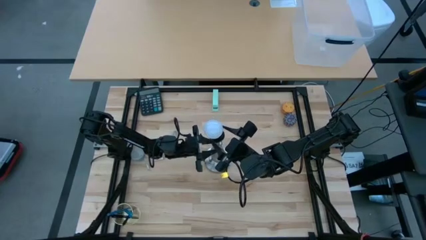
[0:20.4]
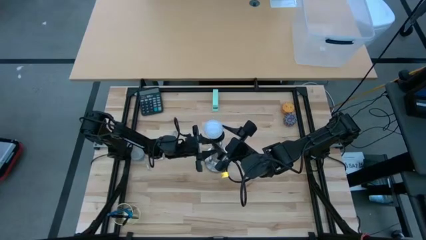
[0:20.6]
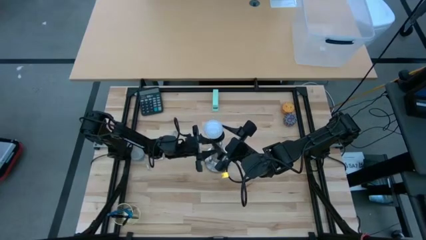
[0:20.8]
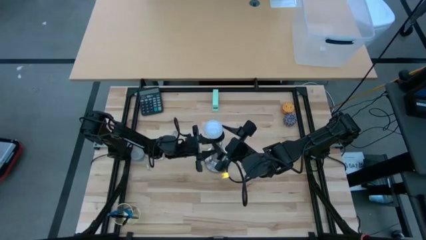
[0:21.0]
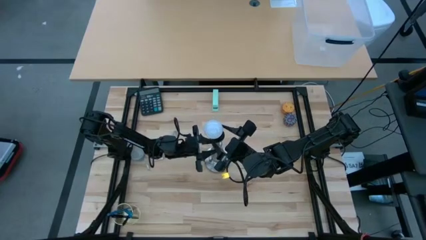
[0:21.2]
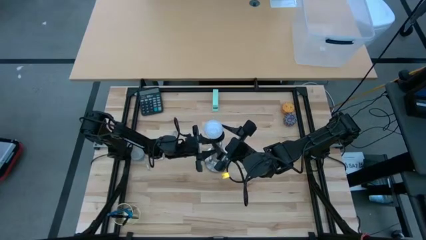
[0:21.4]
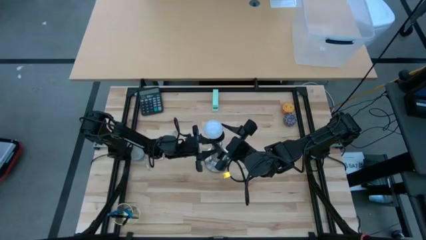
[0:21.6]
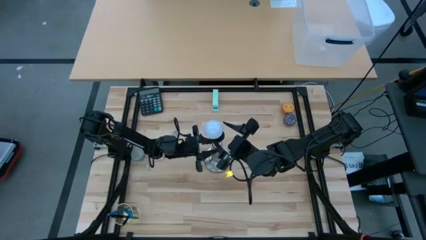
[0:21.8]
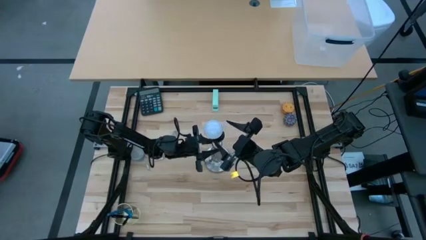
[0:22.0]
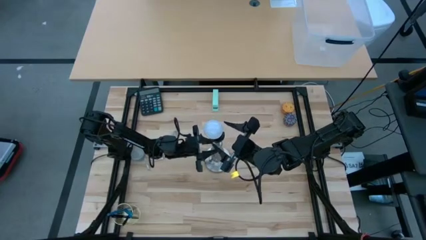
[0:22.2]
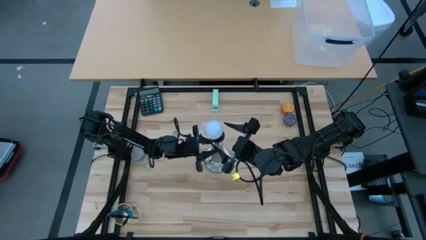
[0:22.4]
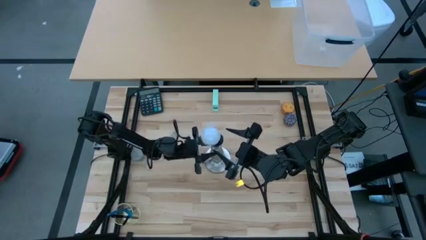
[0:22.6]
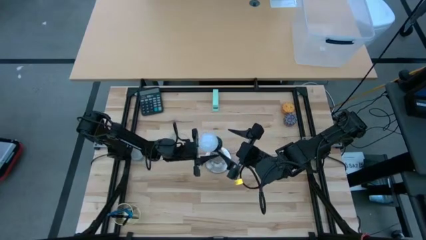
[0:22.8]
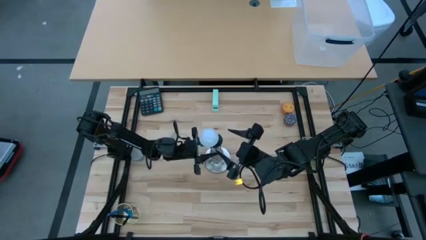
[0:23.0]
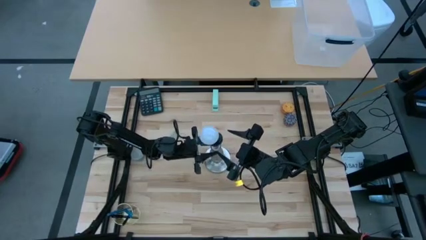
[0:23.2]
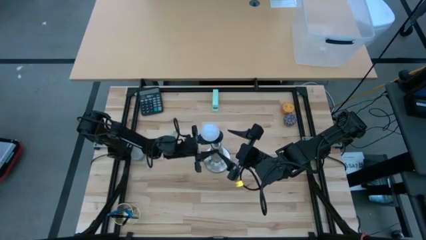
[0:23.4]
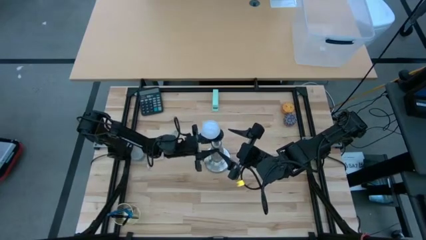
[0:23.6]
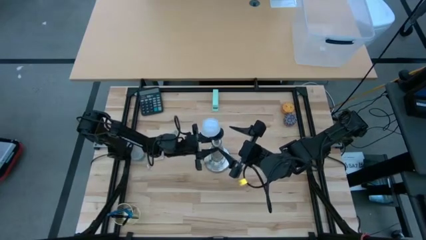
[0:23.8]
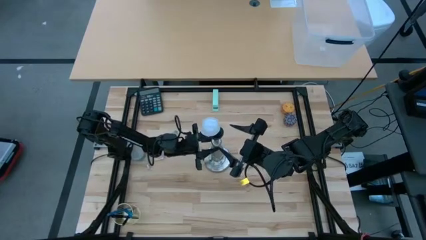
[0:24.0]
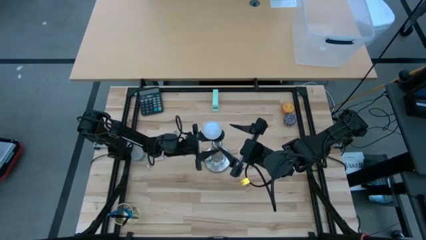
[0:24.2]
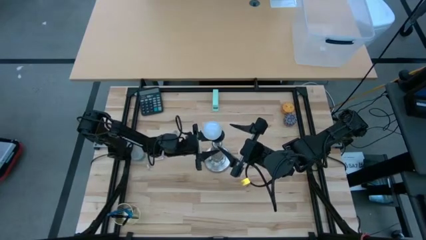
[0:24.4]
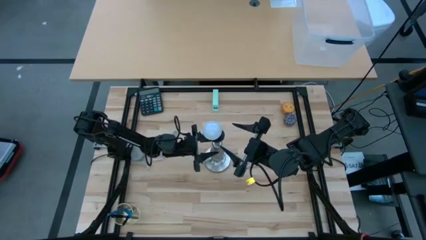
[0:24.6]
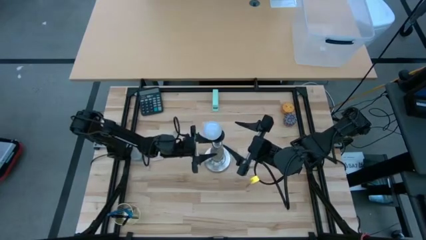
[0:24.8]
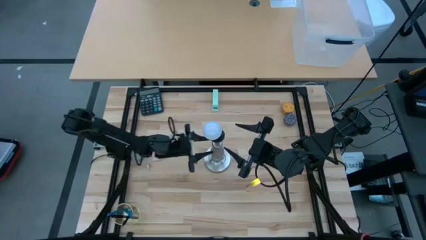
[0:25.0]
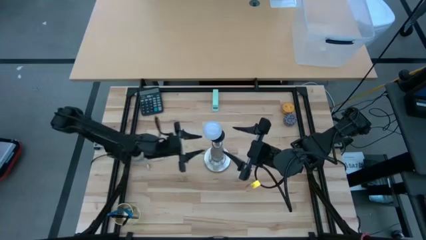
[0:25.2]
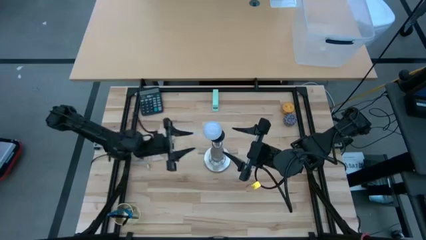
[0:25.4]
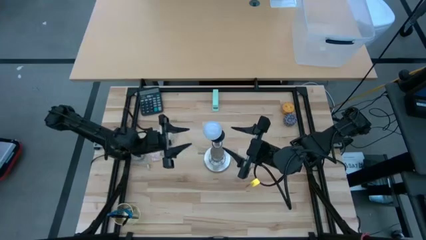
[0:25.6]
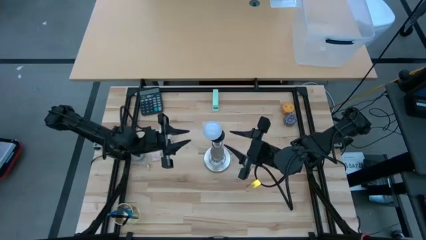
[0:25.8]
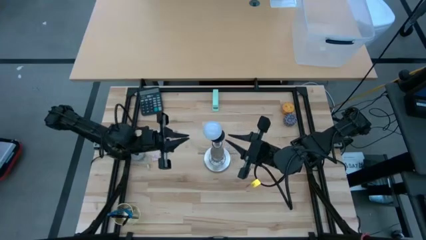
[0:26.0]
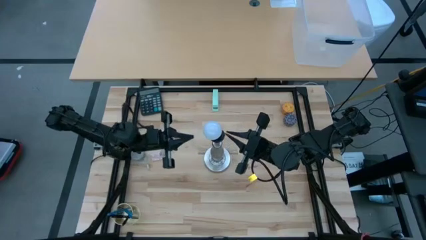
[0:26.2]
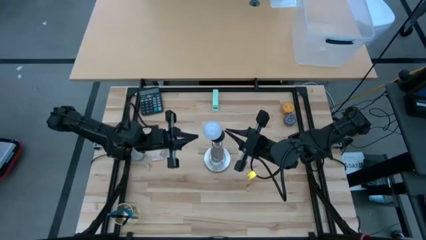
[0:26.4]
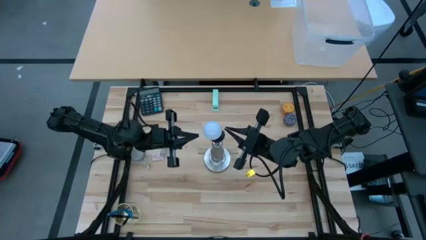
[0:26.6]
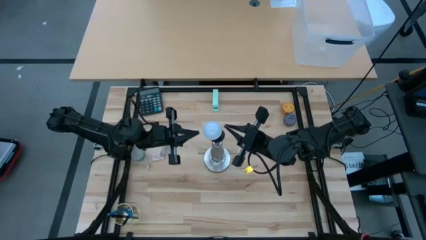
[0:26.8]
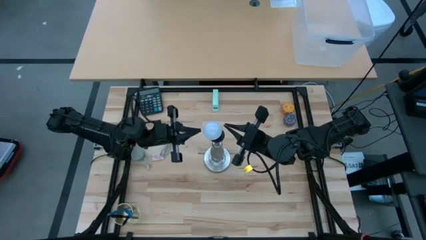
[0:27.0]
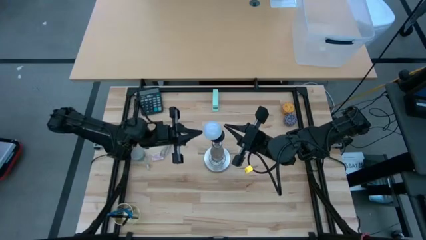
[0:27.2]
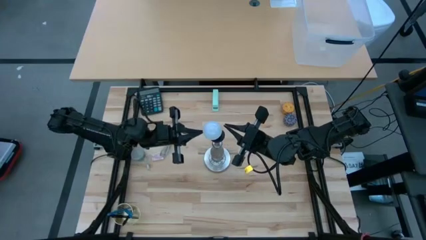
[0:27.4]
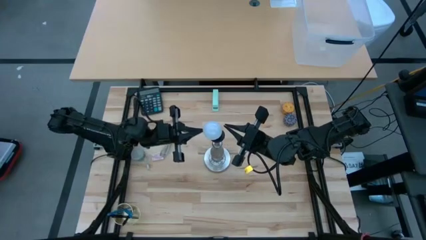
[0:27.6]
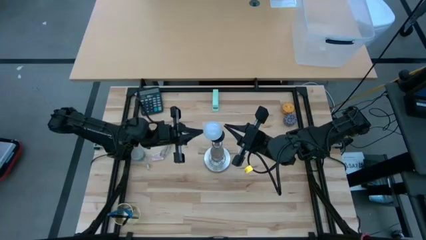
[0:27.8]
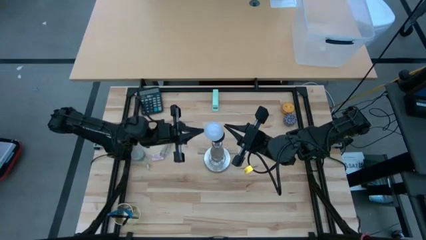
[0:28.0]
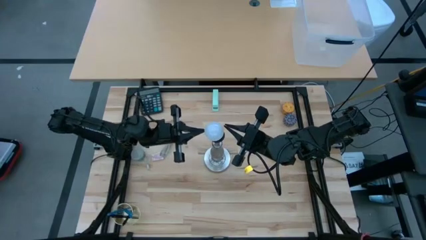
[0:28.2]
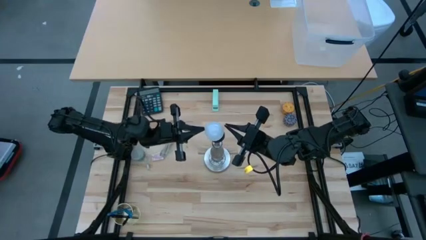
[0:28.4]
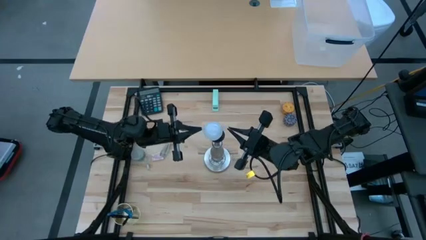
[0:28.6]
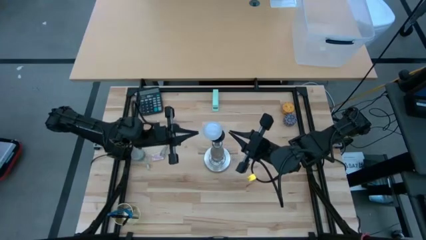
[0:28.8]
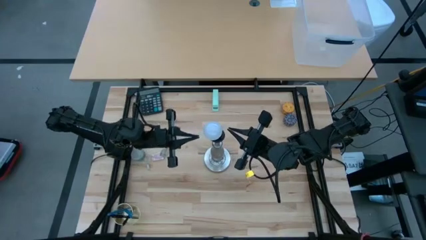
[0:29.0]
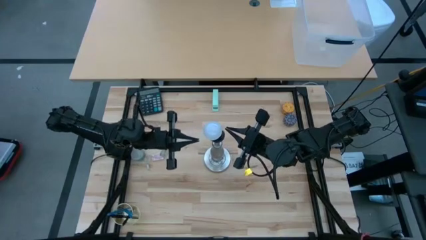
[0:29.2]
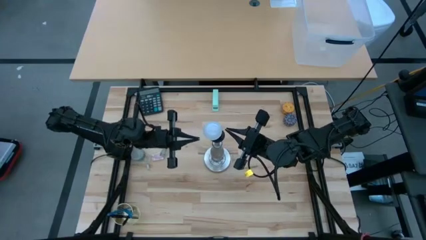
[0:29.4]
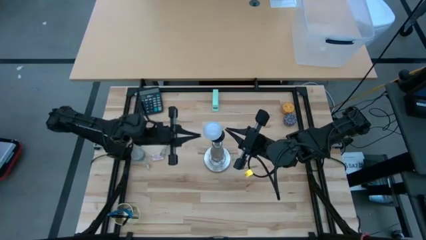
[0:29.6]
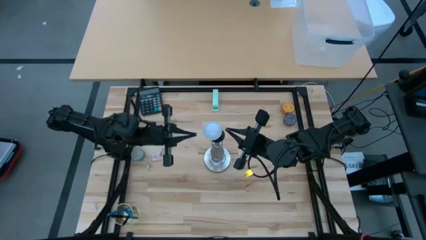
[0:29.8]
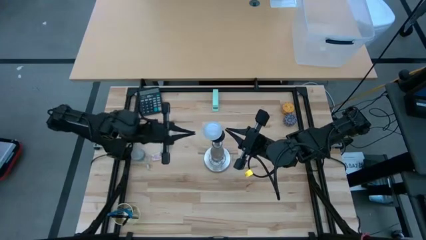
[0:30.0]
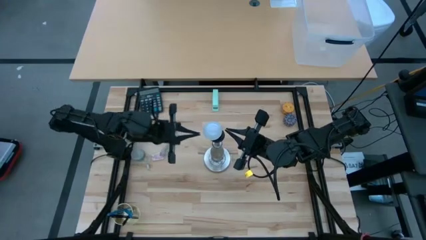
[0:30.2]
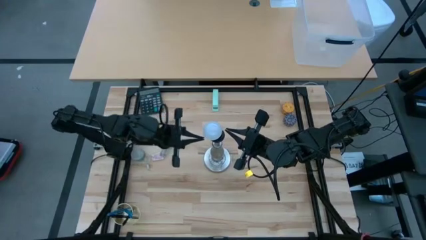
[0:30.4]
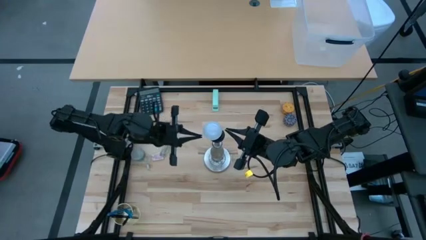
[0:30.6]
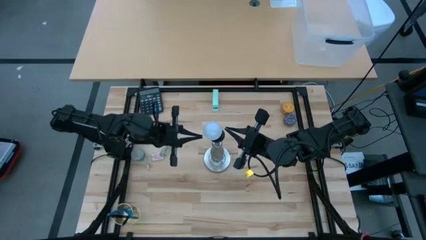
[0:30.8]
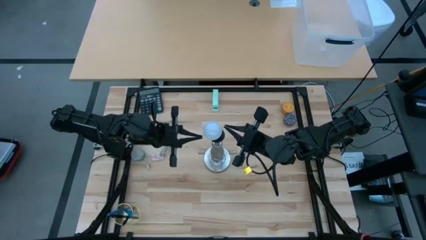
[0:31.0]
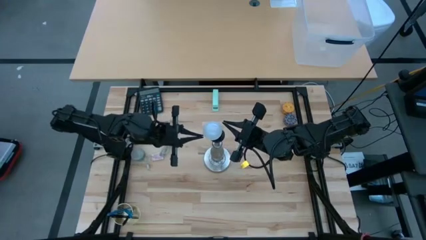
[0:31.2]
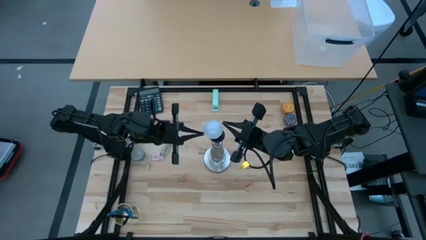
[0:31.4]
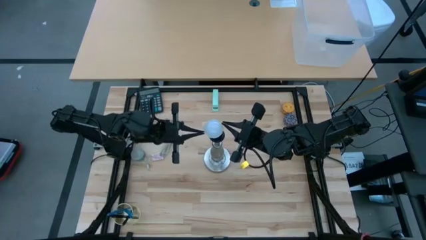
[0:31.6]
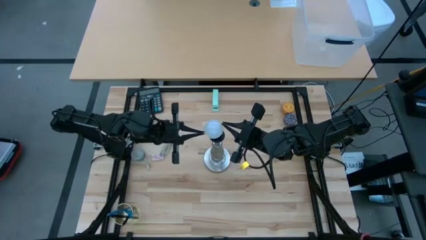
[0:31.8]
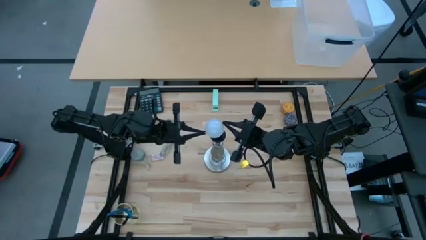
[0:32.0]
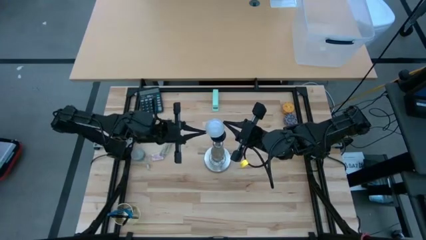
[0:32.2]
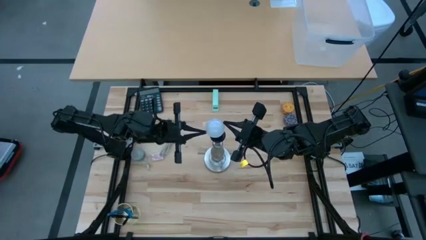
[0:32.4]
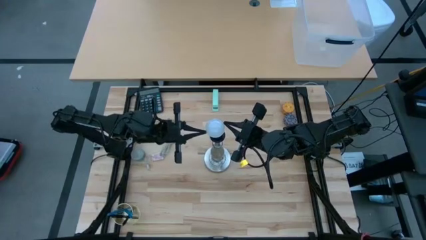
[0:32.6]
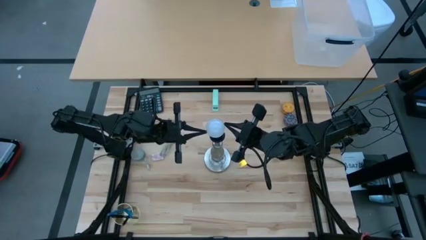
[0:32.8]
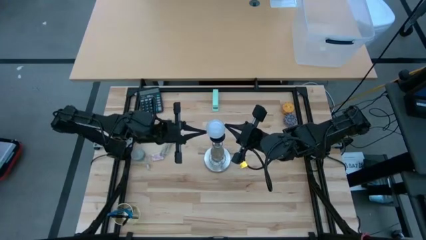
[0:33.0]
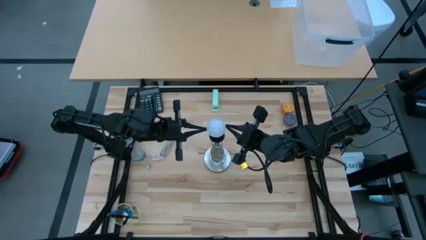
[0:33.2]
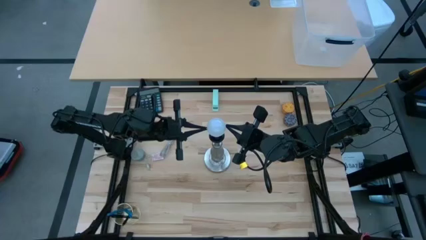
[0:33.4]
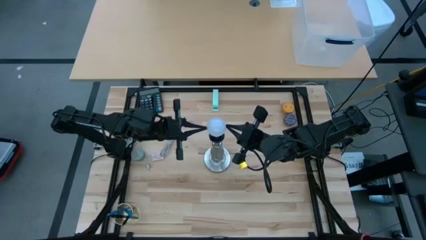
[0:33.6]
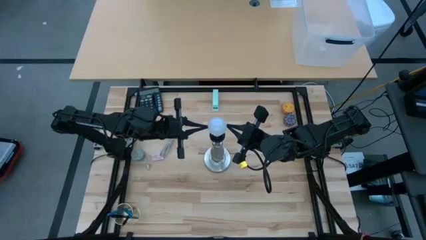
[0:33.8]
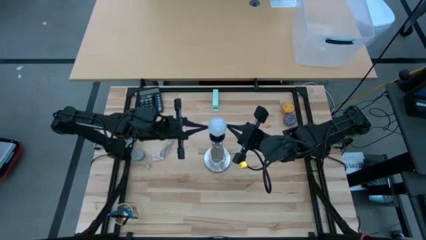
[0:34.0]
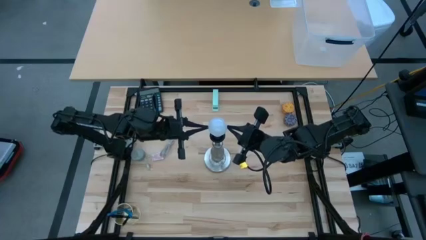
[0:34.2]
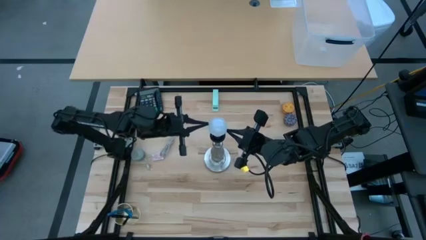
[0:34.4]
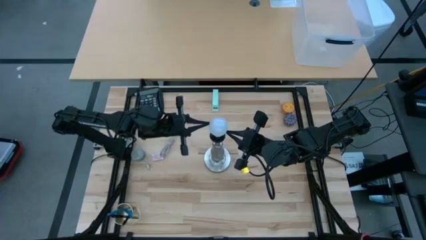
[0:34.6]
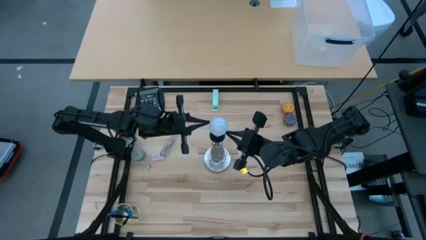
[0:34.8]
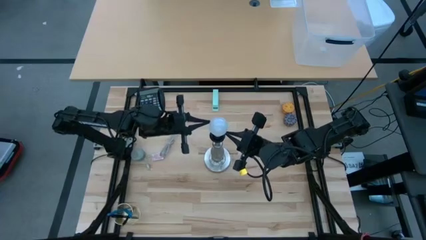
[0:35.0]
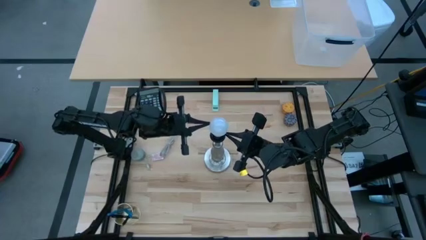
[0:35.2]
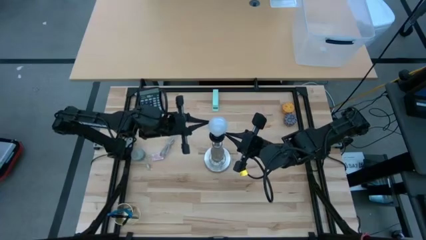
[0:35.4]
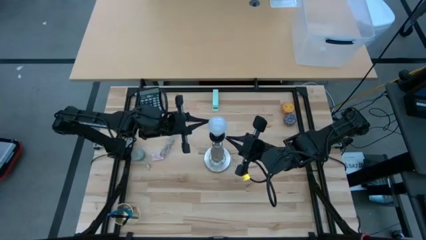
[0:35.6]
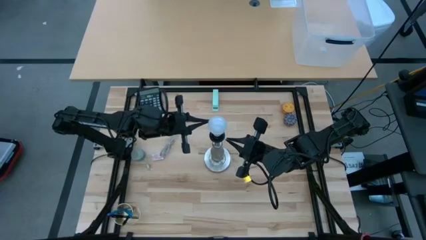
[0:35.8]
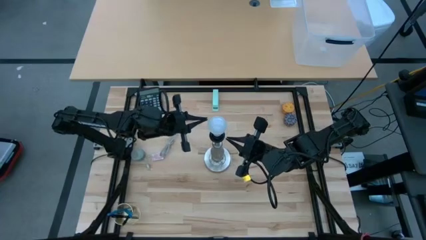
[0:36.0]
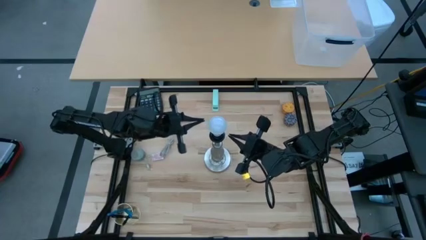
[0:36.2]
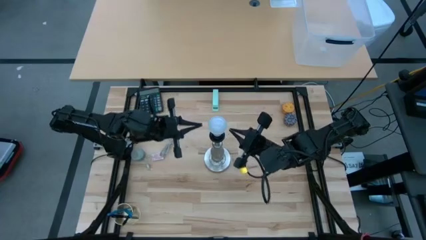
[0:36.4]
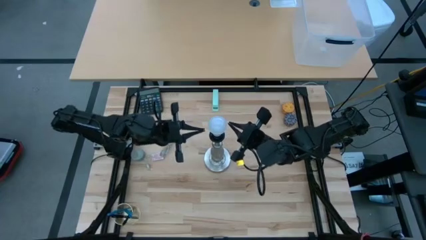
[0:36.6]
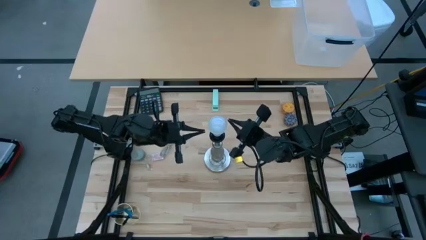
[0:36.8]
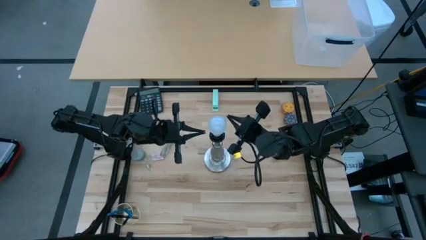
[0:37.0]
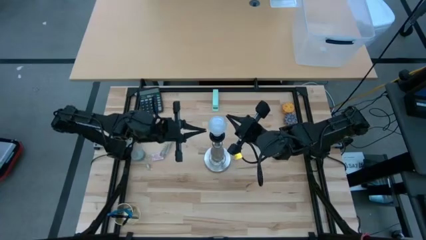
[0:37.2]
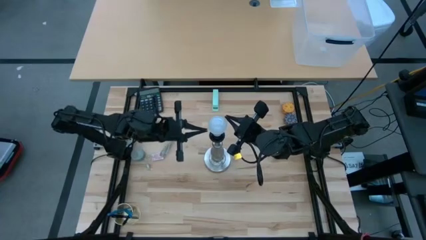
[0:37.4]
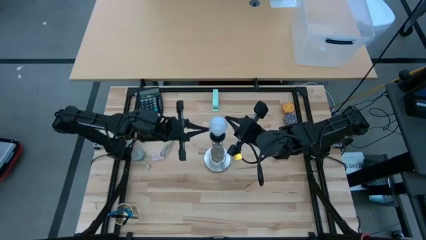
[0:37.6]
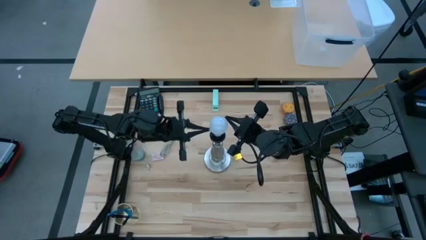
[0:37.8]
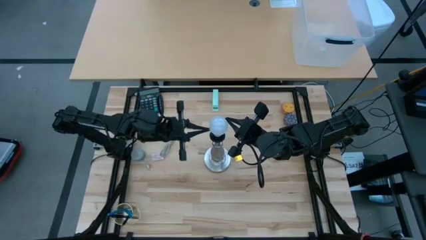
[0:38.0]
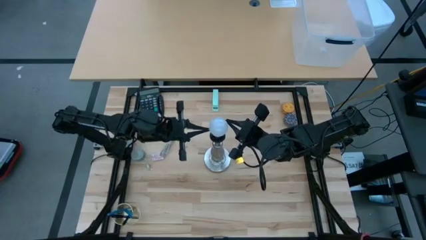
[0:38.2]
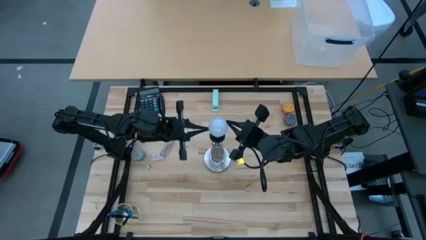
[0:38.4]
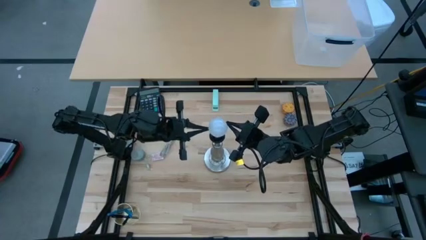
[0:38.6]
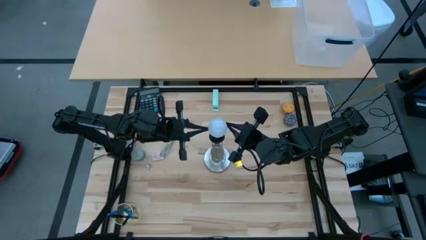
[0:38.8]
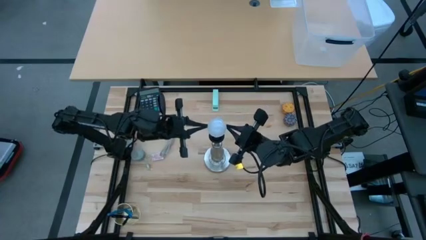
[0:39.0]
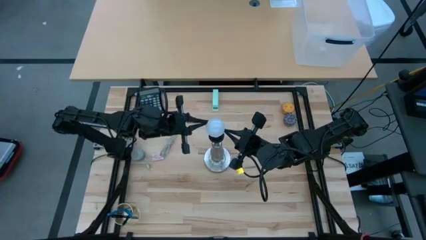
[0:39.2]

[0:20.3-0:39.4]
Task: Screw lightbulb
Insert the white lightbulb into the desk lamp
